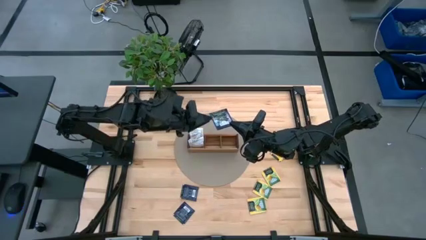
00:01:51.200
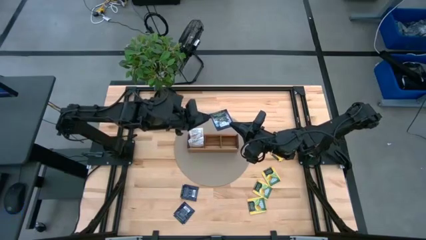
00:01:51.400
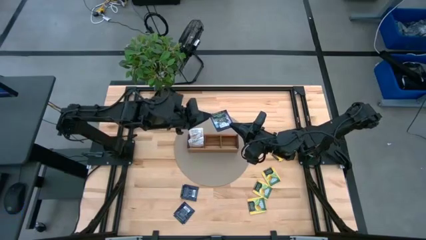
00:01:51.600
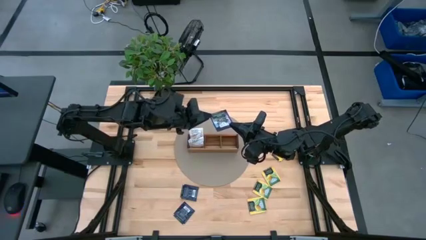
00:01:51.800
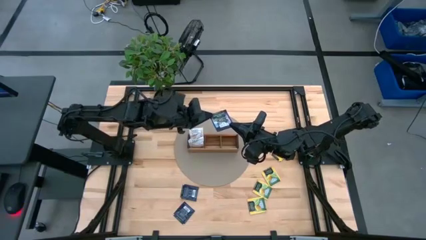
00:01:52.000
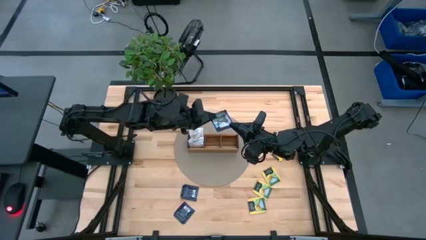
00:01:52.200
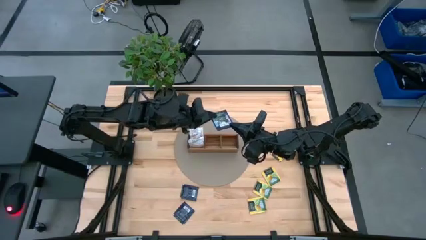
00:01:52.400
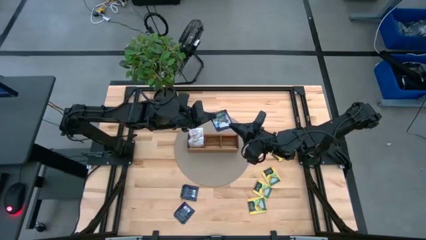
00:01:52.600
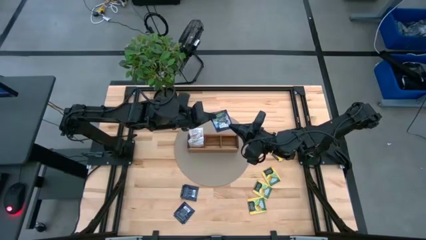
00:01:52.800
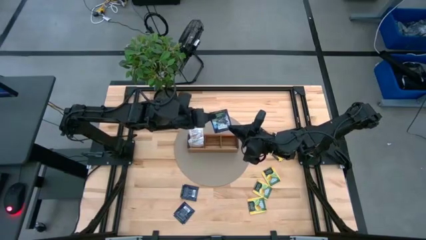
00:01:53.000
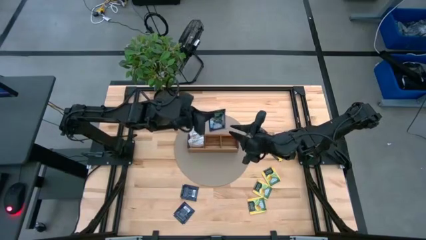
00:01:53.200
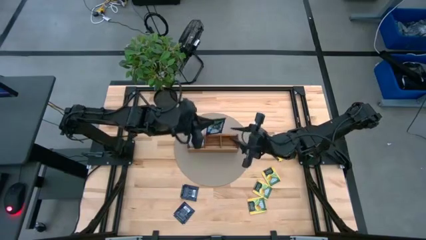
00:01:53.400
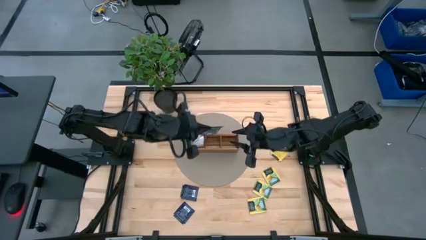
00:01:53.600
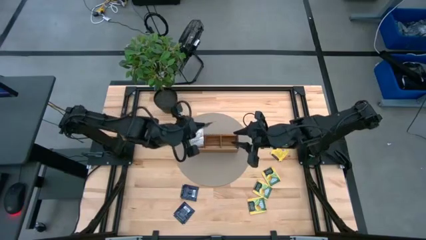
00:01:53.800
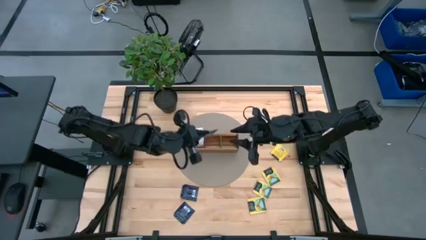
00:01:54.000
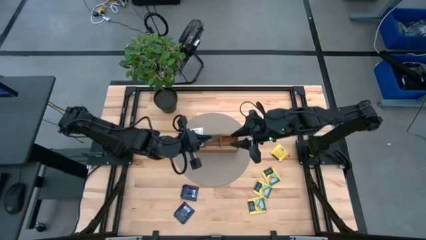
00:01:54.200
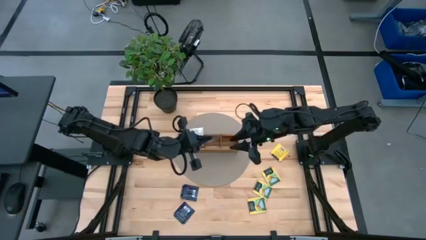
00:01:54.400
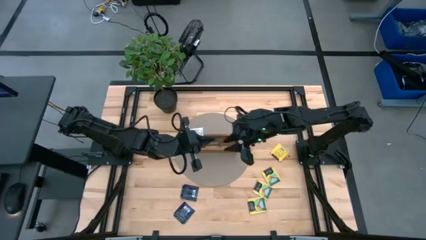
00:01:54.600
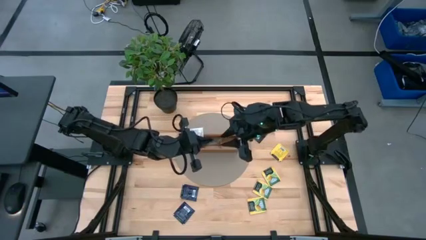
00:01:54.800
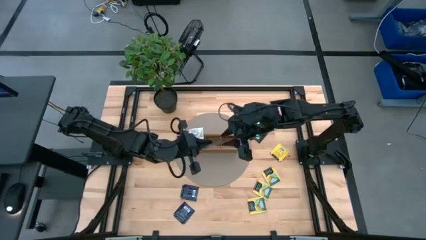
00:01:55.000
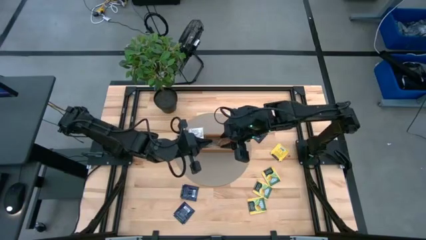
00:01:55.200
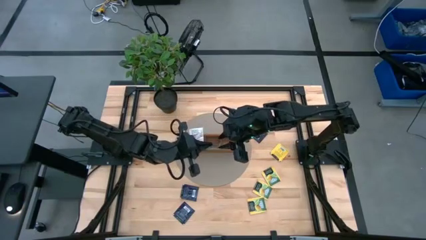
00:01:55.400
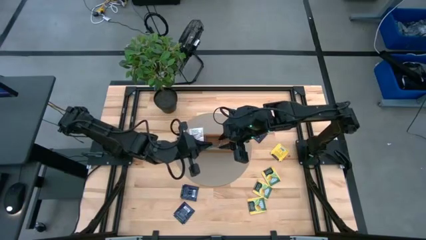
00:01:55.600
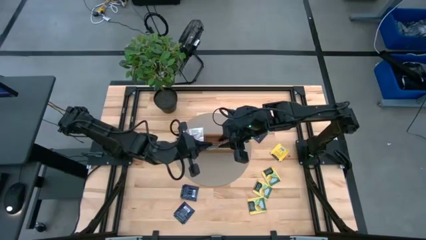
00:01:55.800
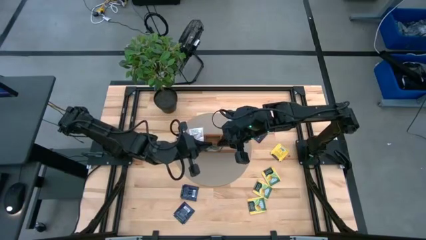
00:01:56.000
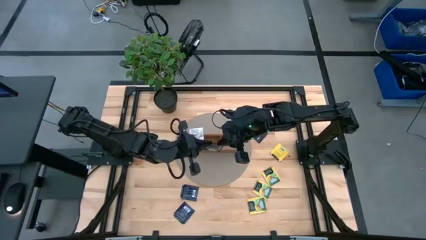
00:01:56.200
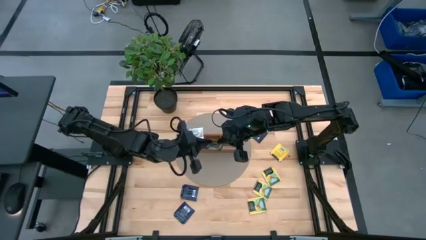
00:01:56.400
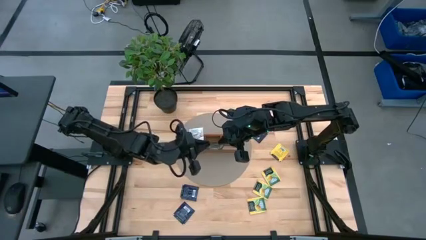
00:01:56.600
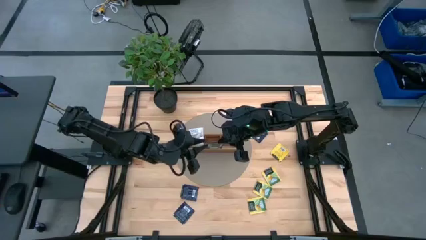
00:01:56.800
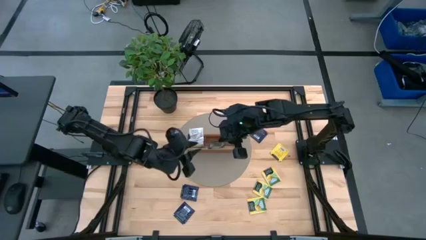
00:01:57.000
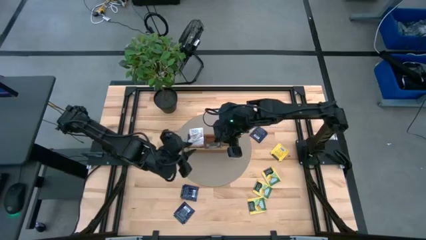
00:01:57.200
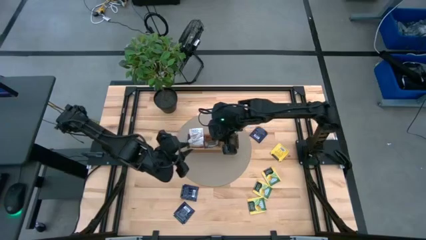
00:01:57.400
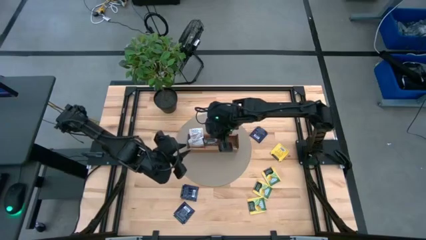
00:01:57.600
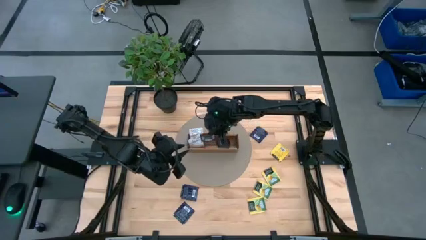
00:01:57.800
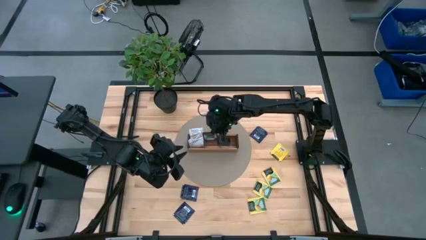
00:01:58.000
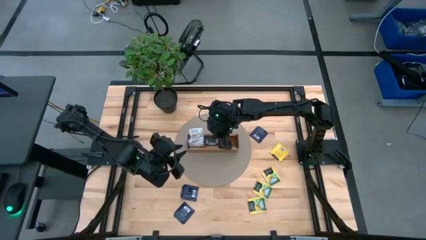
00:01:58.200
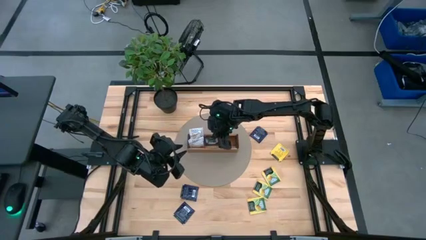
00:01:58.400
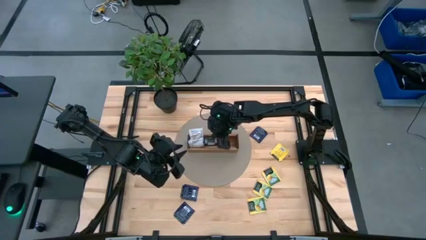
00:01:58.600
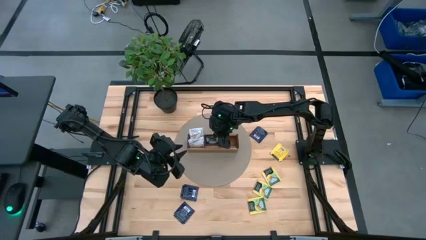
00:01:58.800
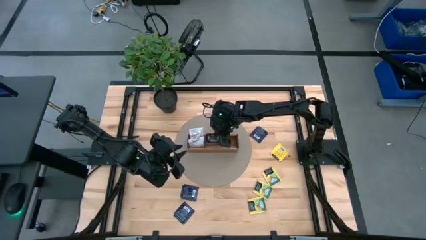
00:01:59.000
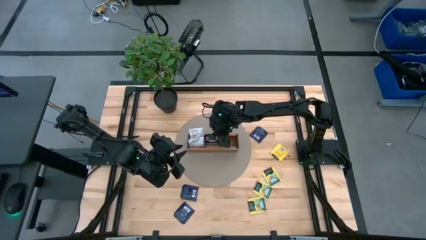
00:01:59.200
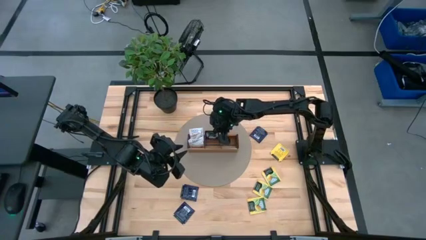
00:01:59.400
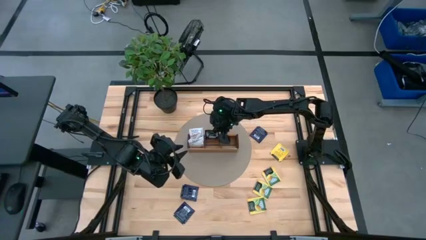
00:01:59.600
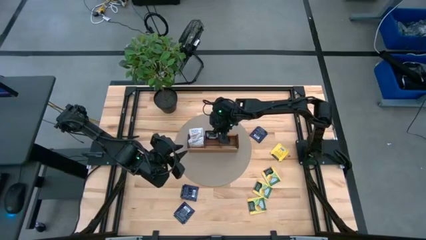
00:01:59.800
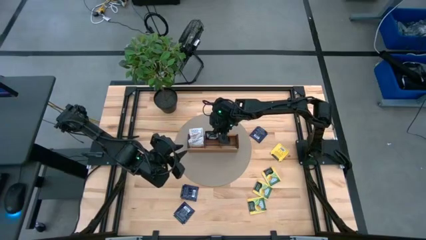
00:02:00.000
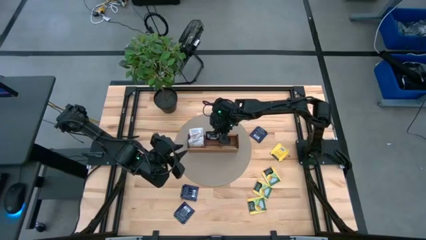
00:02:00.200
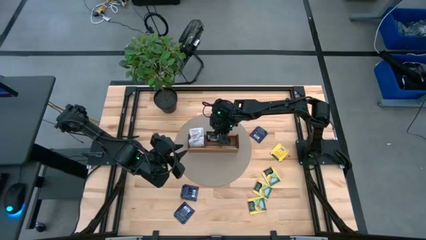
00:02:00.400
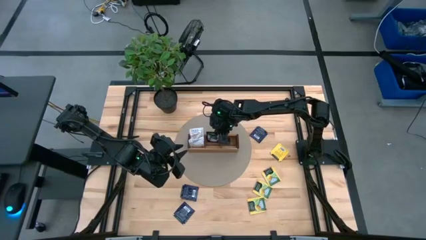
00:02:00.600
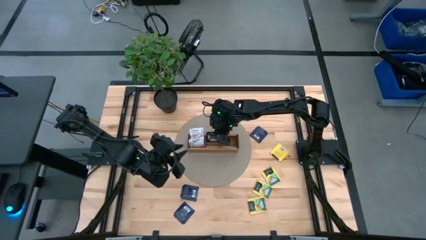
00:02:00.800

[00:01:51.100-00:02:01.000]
Task: Pick & Place Tea
Put the blue tea bag into the middle section of the wooden organizer

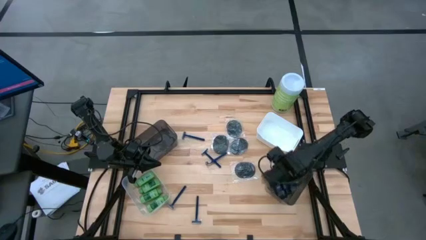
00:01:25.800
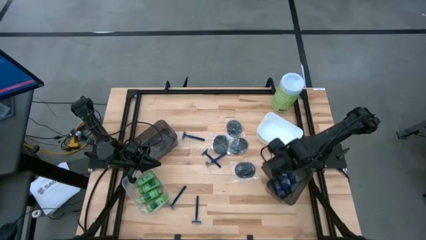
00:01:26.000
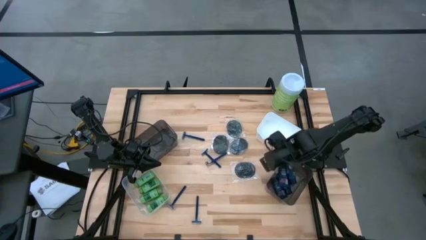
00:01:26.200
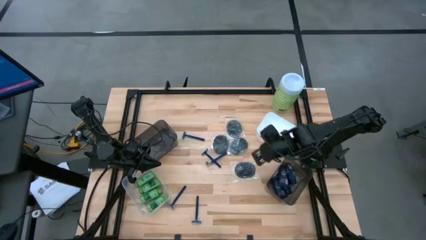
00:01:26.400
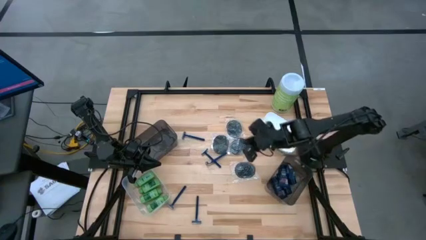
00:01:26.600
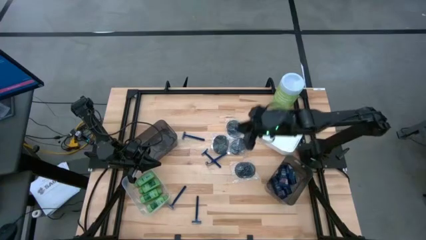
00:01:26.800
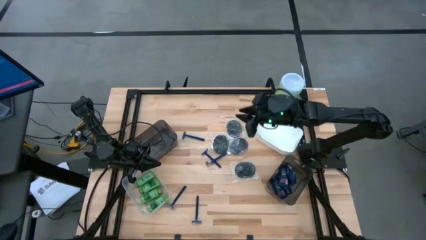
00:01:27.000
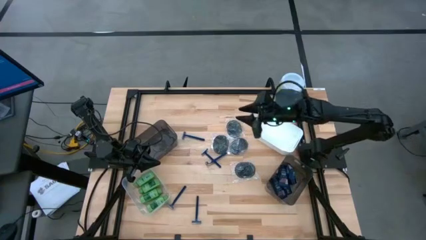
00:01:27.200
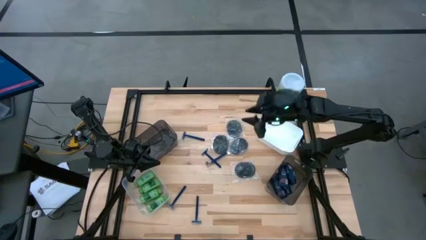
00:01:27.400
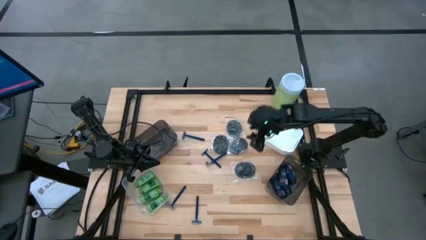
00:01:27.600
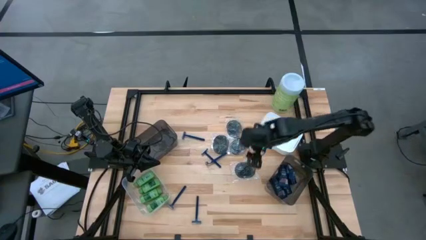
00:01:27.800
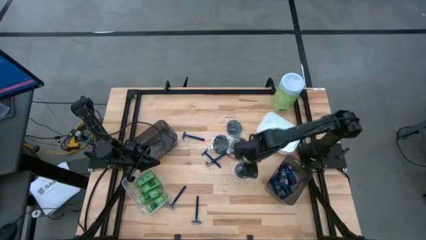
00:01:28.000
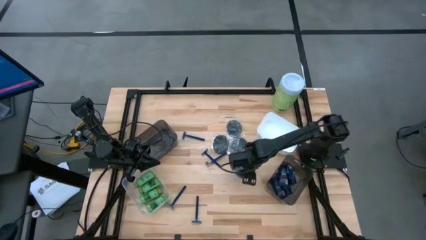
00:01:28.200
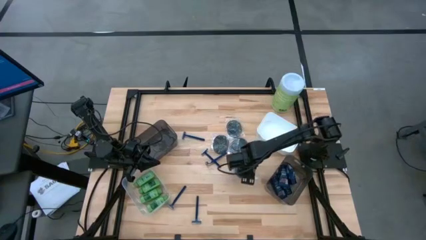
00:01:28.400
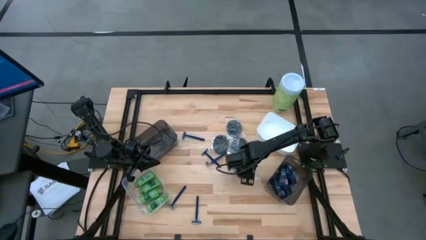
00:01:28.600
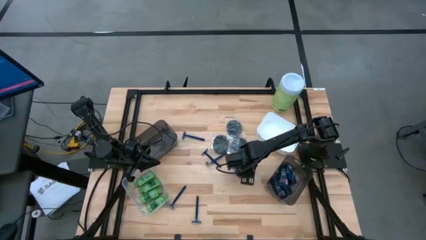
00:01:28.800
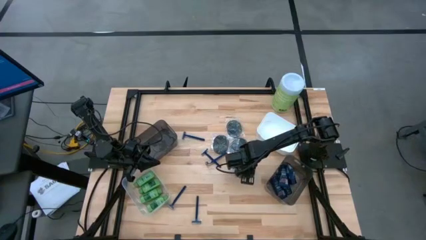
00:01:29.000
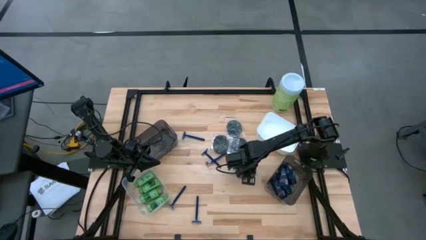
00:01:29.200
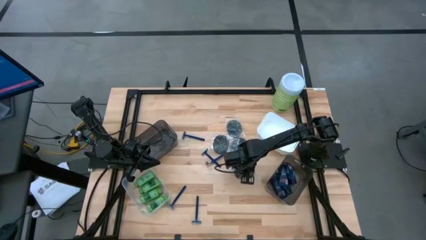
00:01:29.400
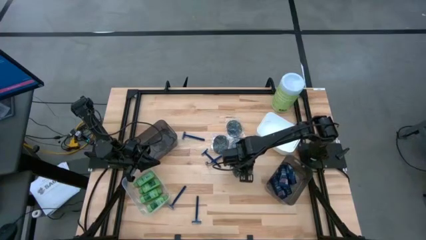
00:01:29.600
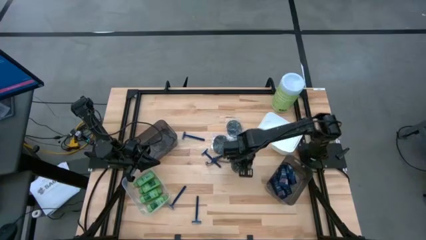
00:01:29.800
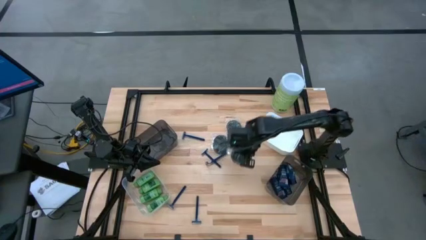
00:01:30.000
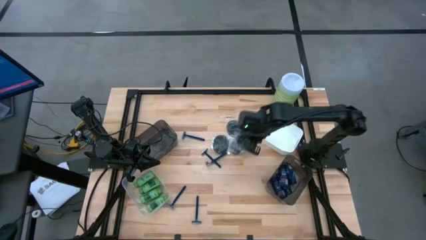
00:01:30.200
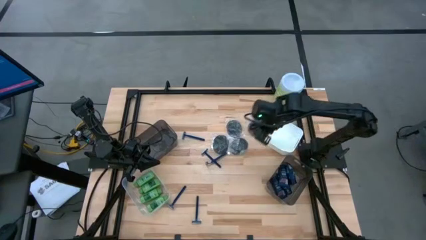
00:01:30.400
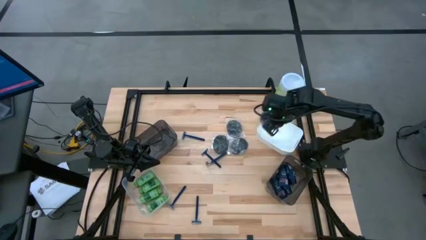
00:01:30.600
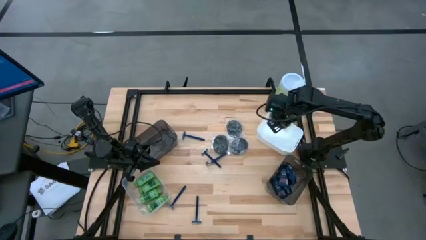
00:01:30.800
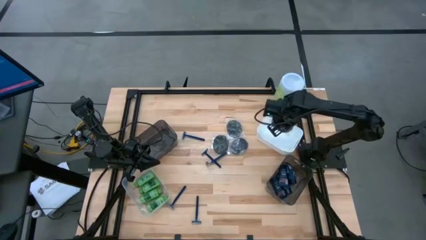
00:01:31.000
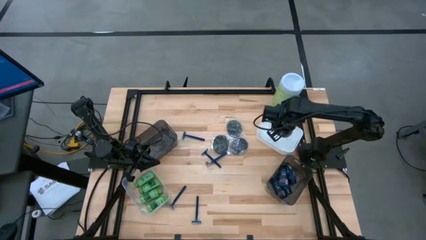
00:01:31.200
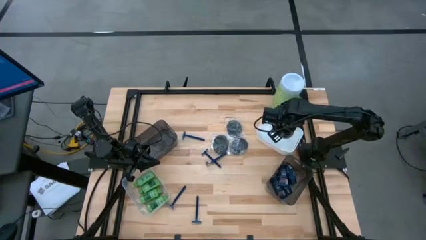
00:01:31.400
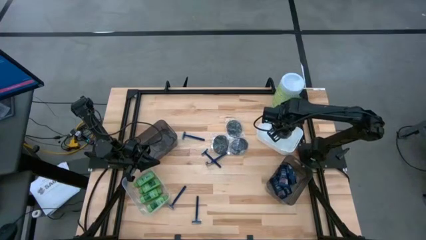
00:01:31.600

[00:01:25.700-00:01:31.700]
Task: Pick & Place Travel size toiletries
Put the black hairbrush into the white bin

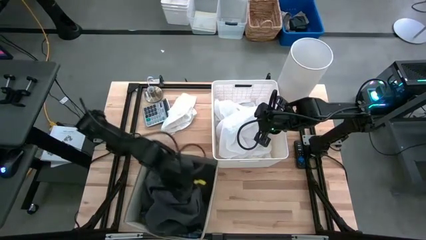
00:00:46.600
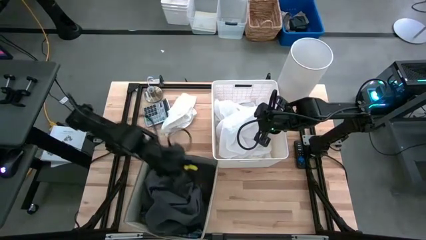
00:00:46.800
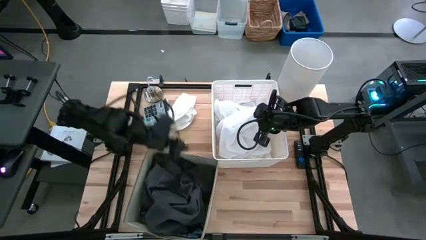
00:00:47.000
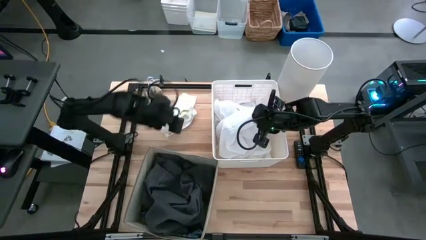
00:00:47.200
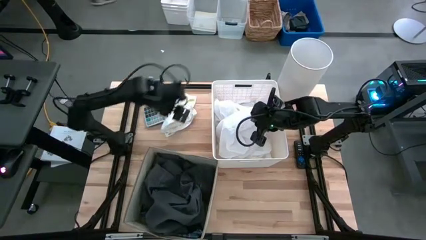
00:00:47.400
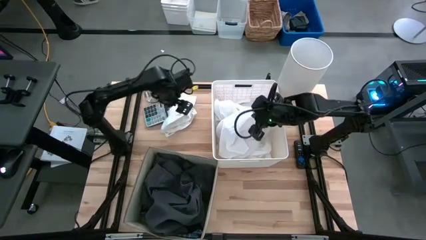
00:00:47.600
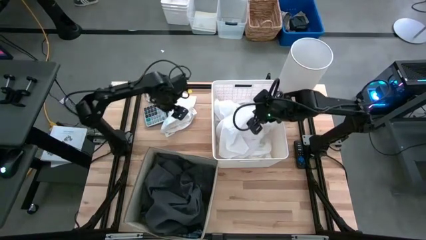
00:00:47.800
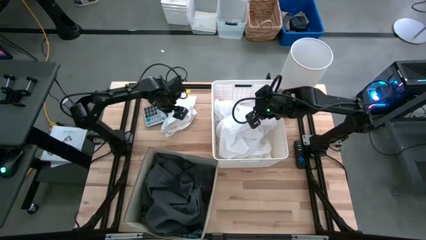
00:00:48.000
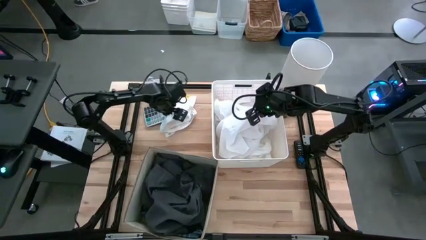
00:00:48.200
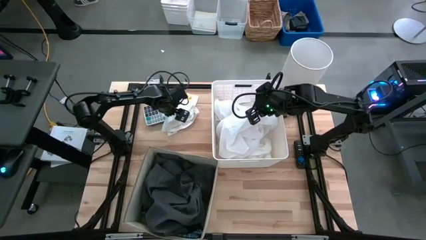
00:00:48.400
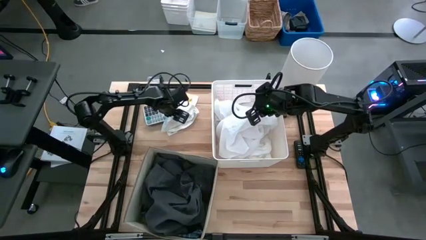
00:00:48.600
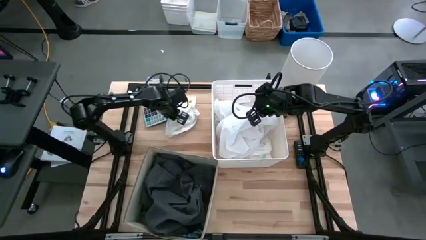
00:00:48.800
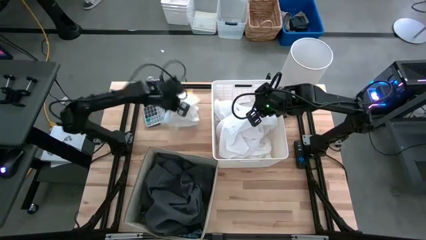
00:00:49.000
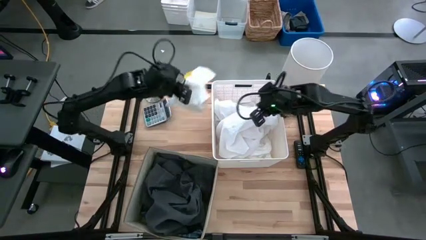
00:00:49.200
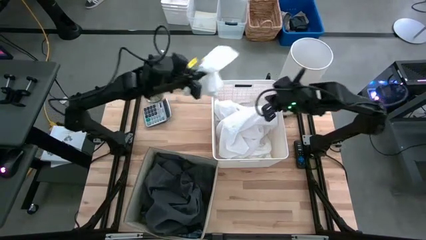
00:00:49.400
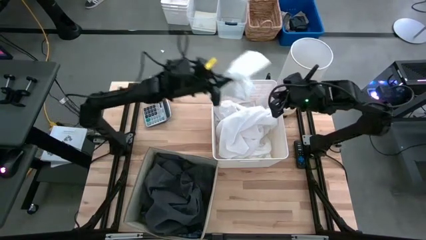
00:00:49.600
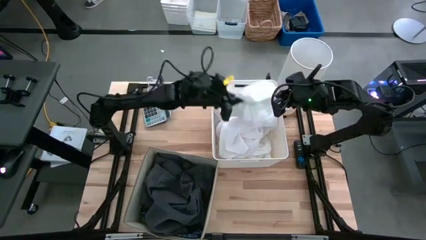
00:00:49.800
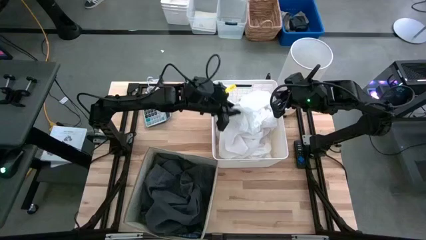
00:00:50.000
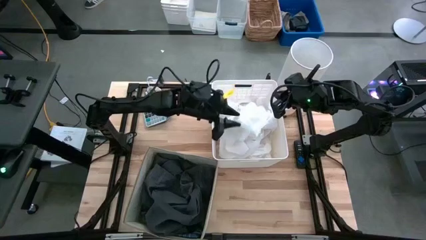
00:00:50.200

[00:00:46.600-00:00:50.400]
Task: Sort clothes
Put the white underwear into the white bin
